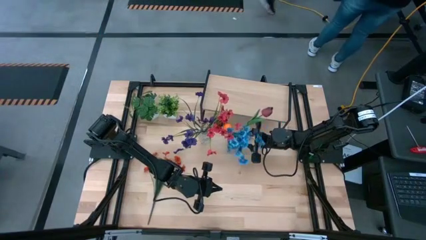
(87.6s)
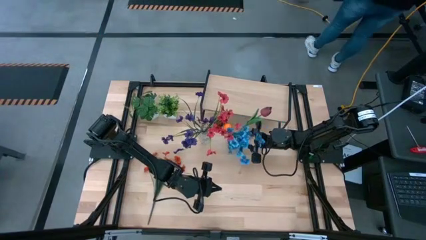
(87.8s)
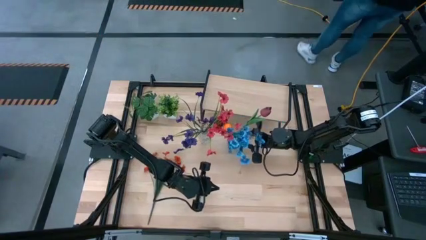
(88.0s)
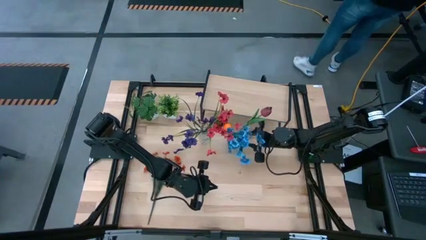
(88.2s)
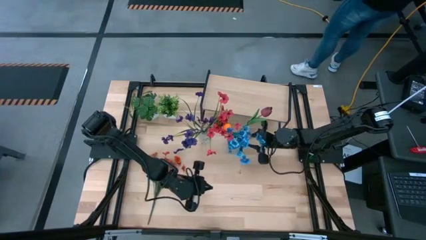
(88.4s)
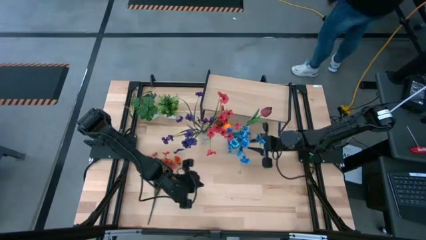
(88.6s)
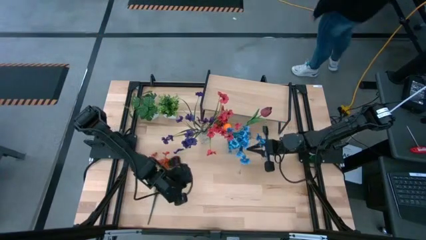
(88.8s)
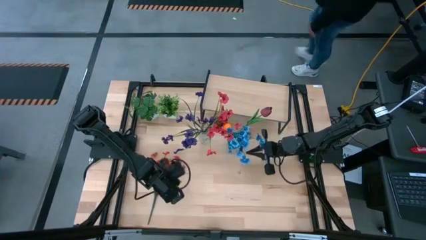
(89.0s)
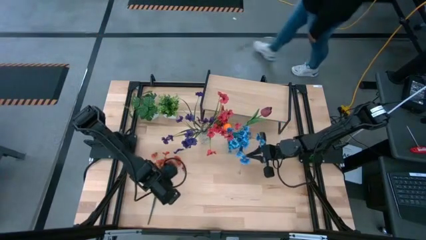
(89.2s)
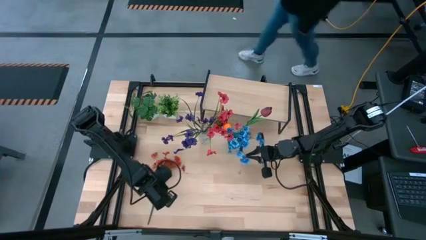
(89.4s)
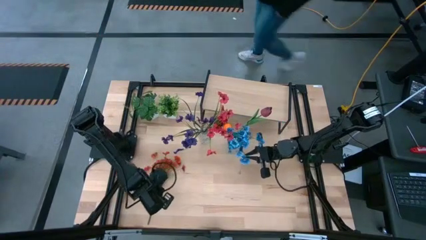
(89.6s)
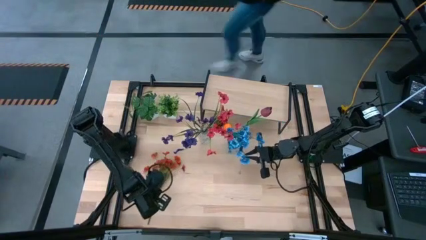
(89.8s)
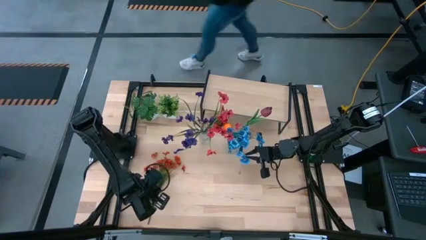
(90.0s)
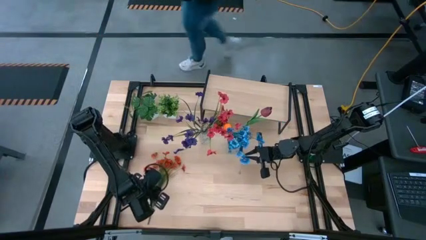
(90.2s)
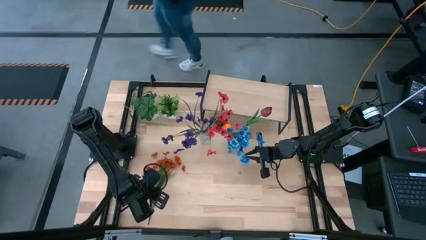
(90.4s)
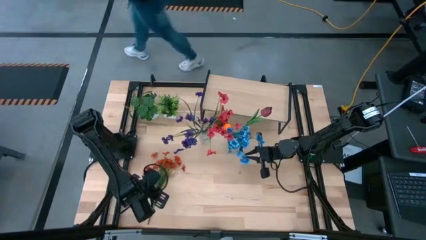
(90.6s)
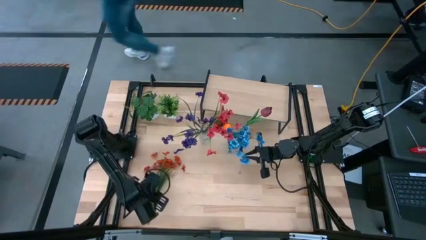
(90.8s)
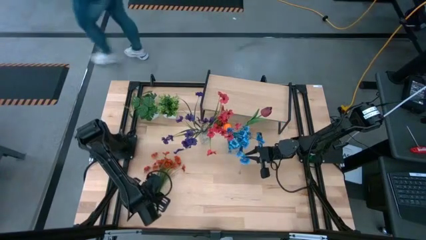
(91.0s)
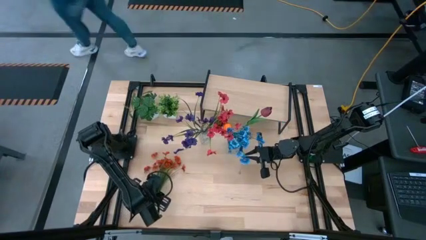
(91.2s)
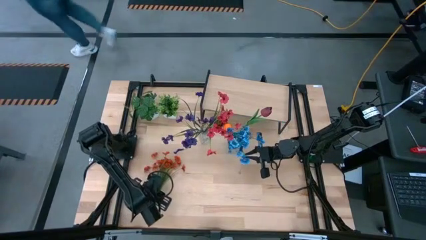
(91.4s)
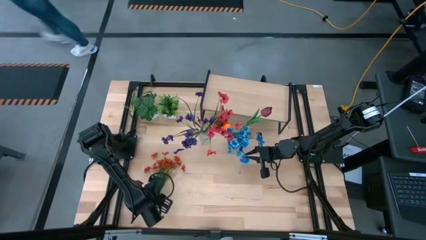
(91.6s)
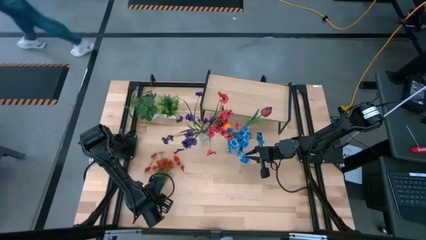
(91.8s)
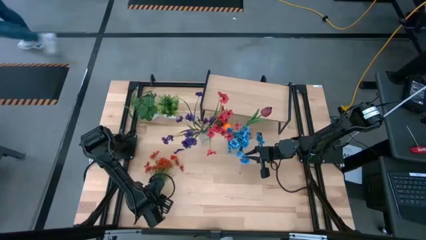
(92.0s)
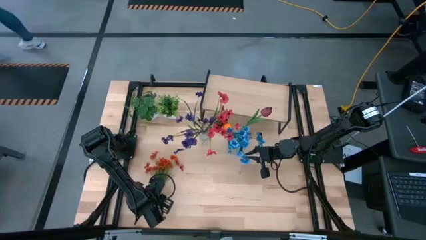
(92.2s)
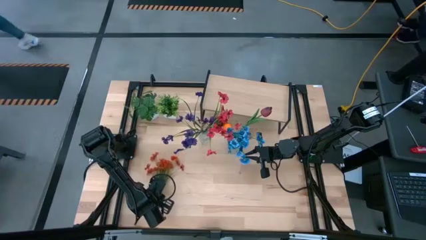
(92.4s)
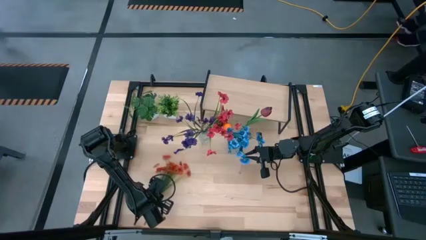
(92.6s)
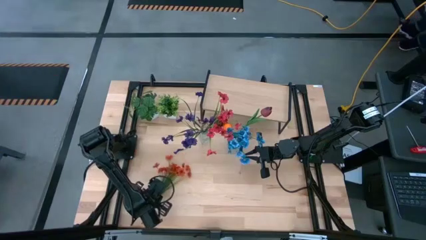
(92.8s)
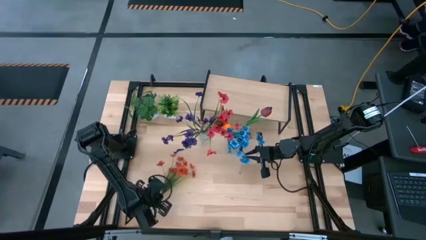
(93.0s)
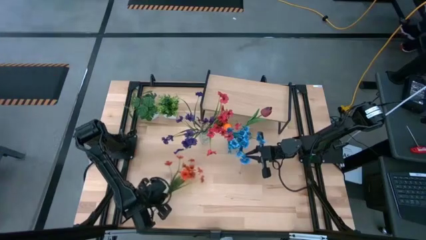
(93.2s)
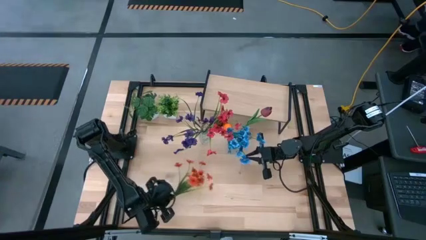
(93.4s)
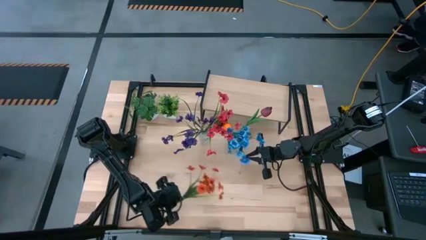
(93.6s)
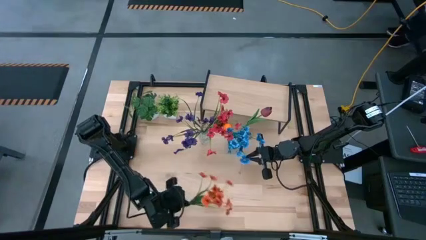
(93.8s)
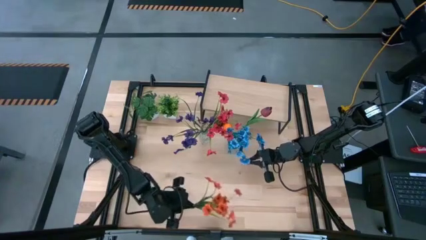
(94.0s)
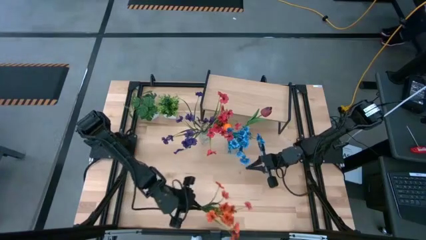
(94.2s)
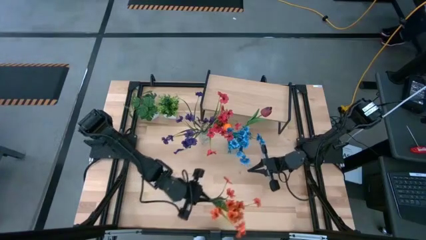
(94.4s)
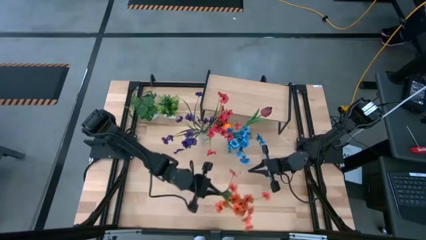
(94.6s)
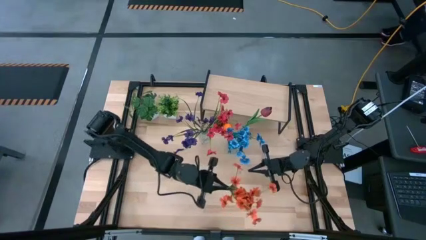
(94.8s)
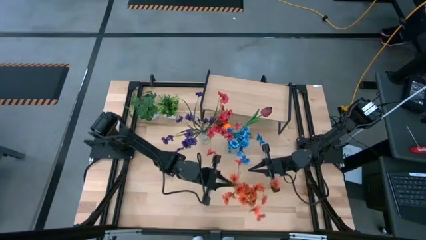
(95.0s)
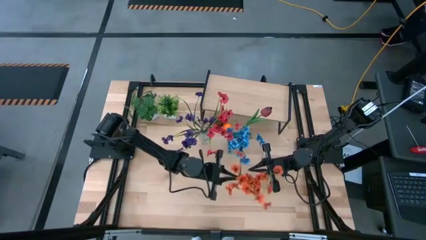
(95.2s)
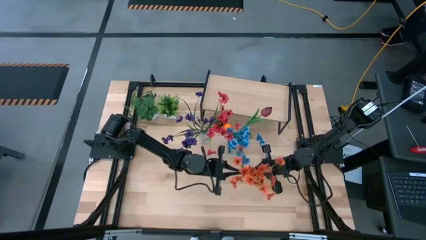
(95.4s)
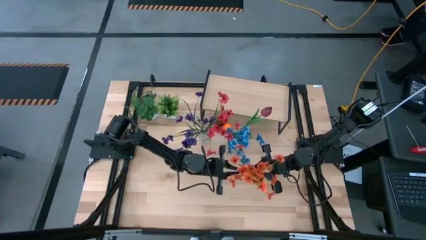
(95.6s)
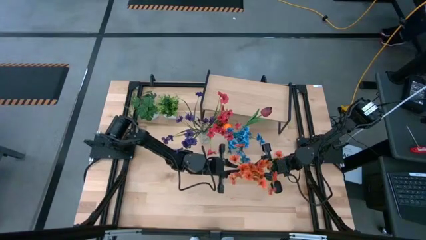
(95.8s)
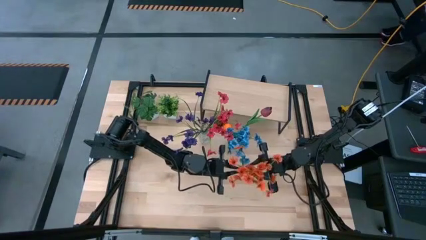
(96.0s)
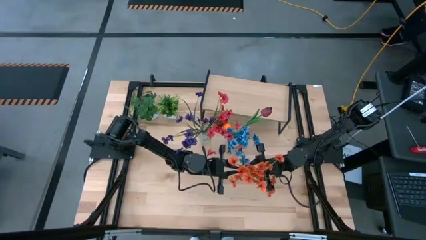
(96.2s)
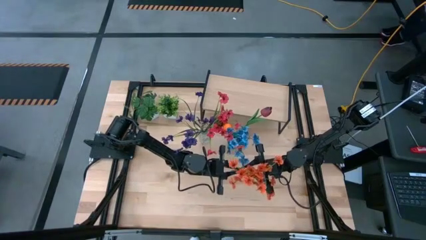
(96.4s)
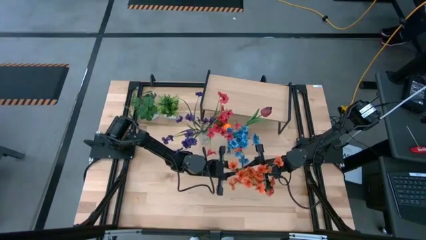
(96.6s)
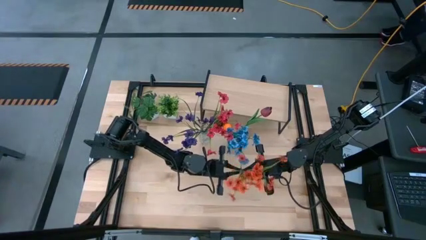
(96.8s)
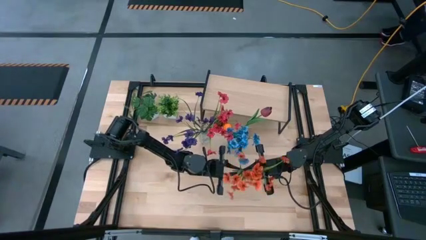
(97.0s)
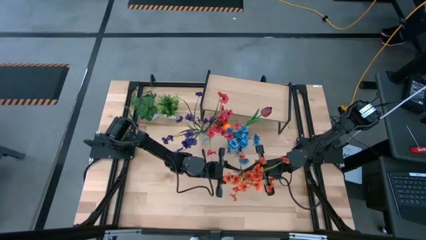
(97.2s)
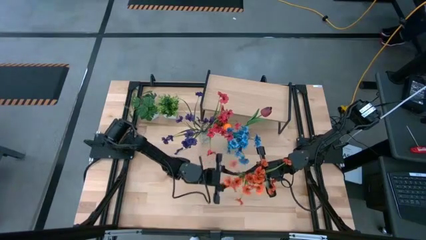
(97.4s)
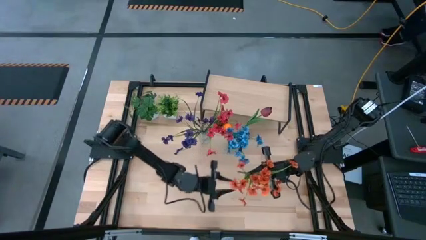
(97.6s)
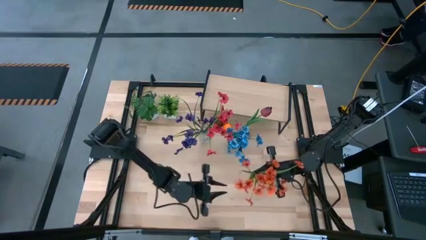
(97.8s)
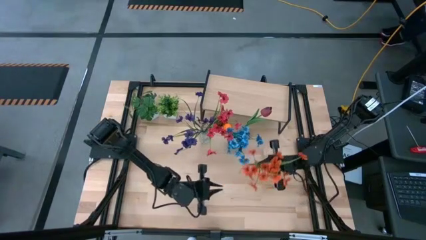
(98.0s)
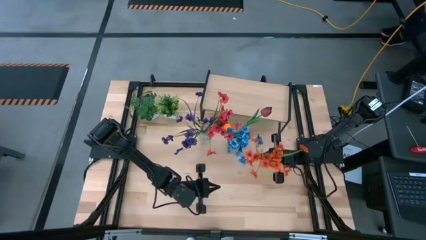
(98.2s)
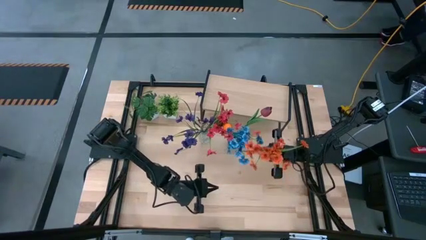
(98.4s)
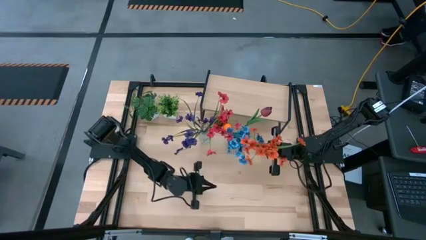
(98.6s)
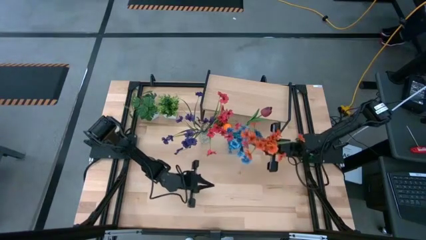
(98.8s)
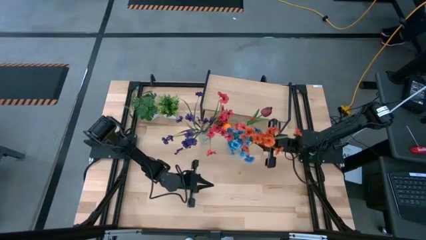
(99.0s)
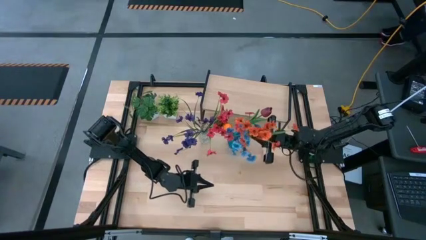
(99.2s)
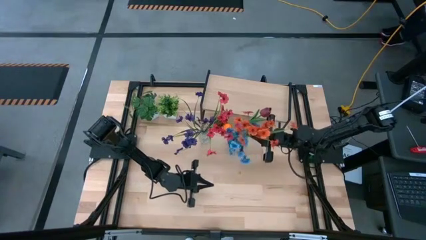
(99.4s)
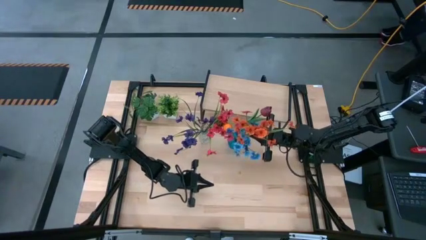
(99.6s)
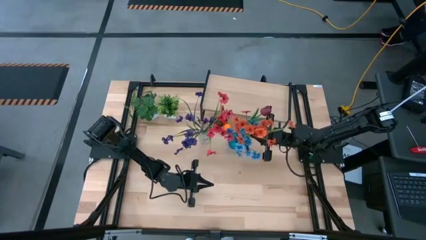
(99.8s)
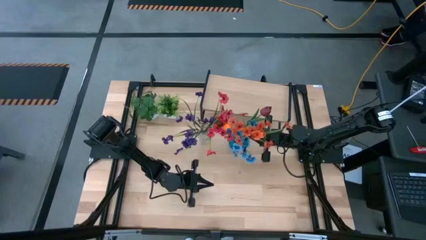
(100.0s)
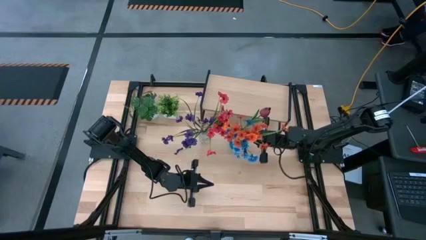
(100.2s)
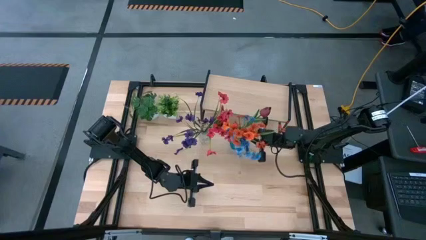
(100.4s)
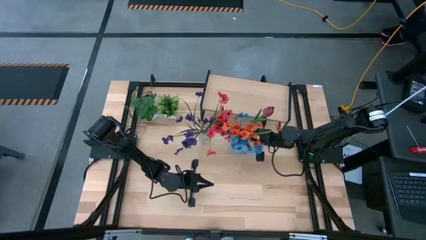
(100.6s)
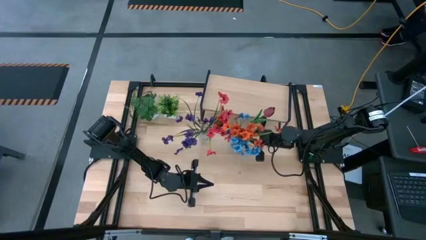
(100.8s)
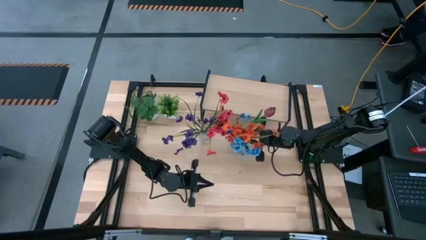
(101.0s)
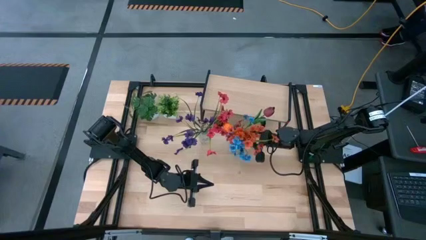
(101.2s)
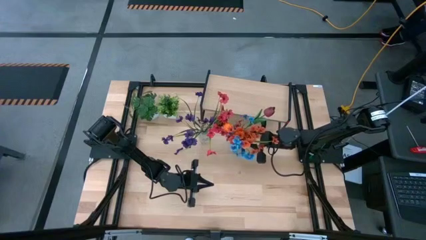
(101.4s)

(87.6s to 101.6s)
Task: Pick and place flowers into a vace then onto a shelf
Put the orange flowers into the blue vase
